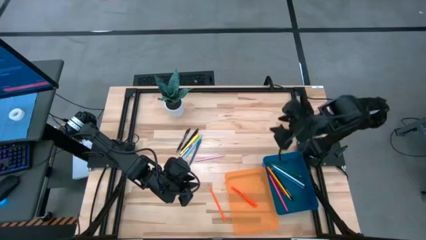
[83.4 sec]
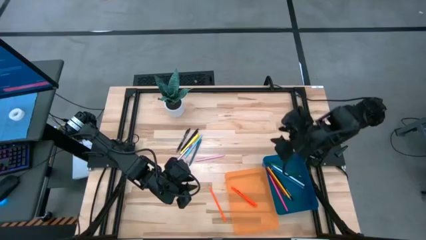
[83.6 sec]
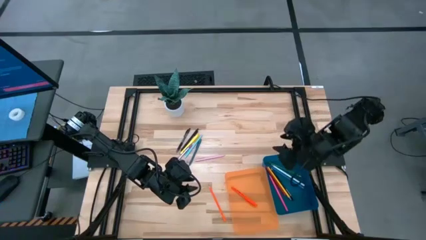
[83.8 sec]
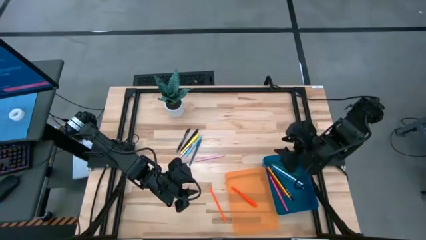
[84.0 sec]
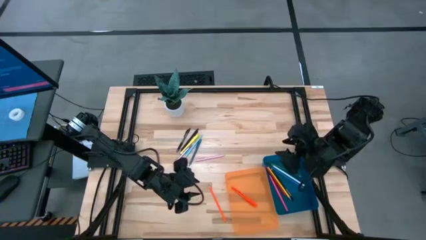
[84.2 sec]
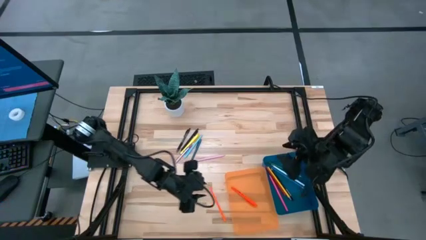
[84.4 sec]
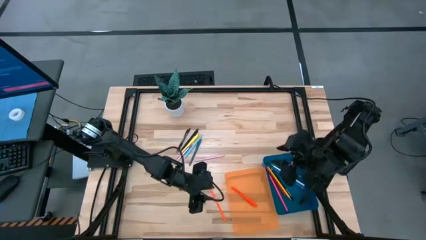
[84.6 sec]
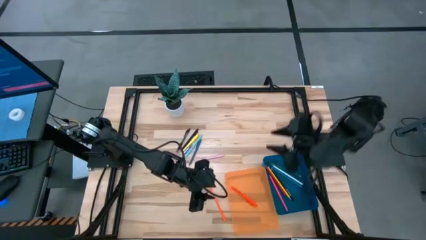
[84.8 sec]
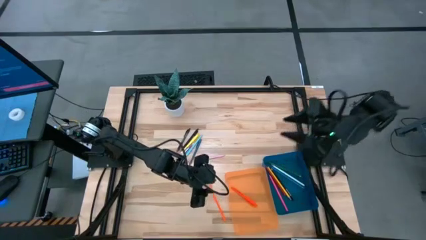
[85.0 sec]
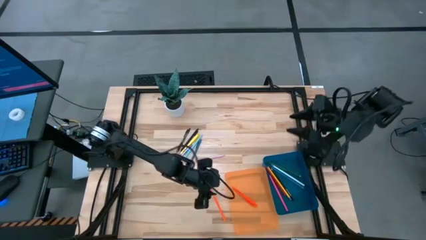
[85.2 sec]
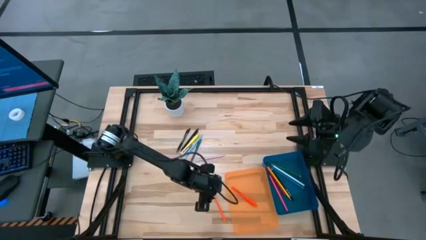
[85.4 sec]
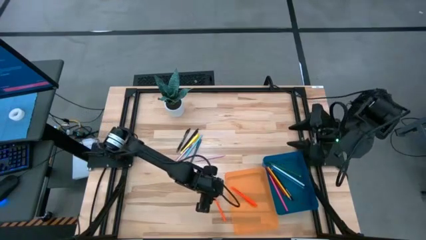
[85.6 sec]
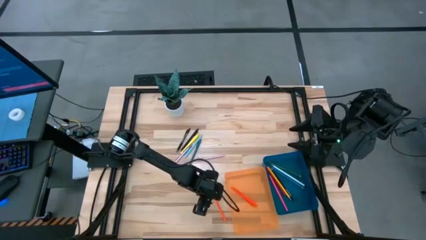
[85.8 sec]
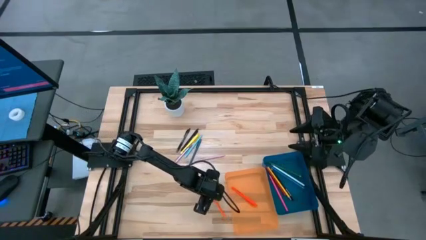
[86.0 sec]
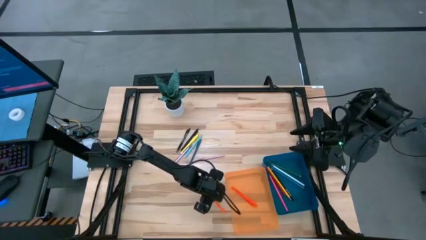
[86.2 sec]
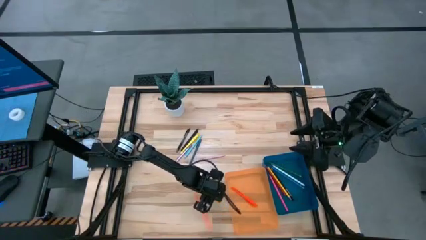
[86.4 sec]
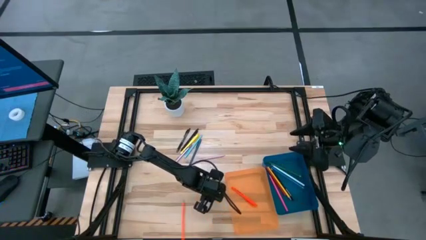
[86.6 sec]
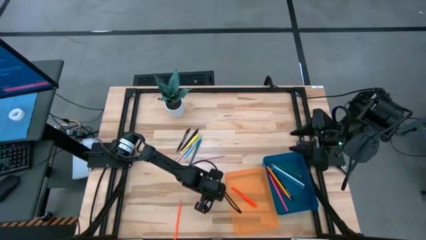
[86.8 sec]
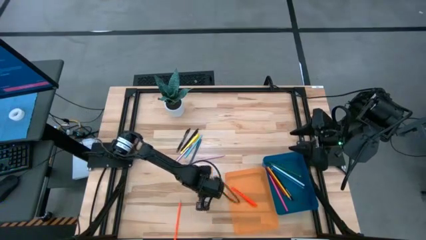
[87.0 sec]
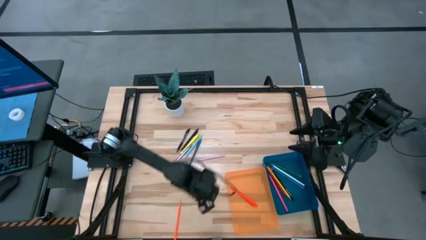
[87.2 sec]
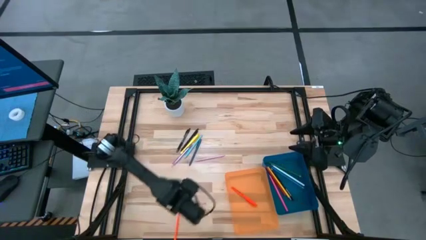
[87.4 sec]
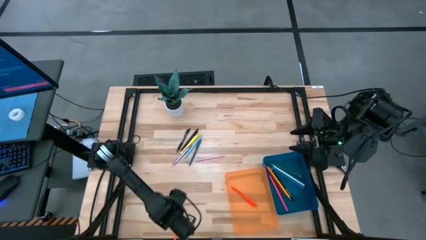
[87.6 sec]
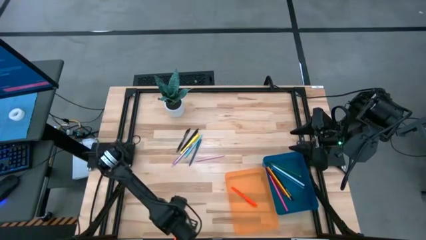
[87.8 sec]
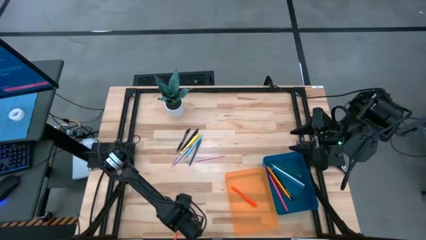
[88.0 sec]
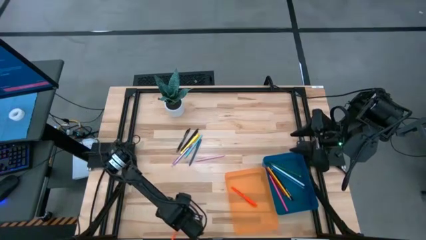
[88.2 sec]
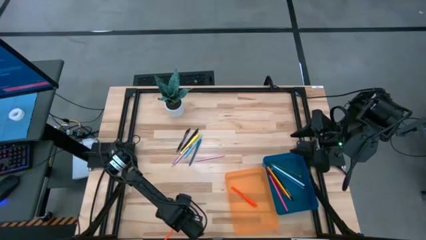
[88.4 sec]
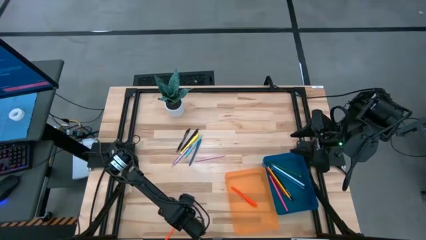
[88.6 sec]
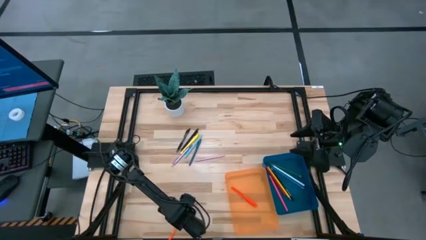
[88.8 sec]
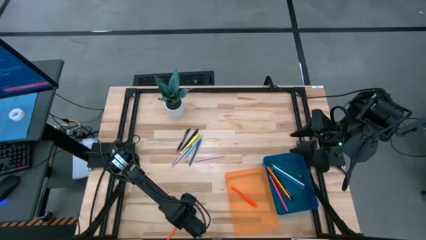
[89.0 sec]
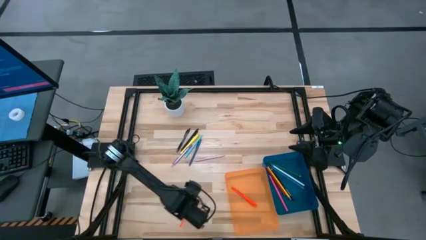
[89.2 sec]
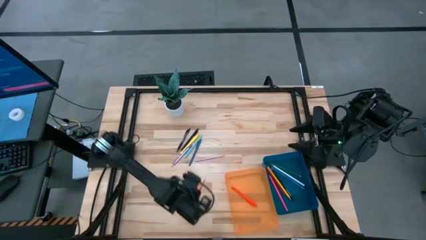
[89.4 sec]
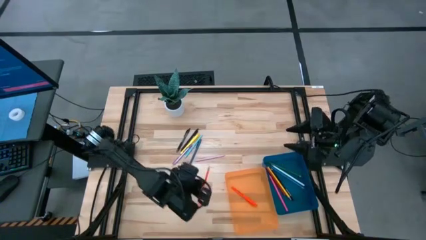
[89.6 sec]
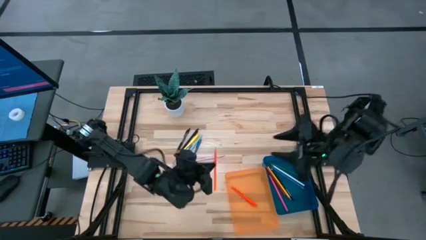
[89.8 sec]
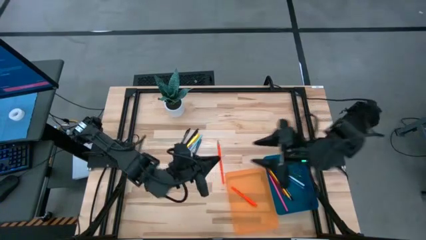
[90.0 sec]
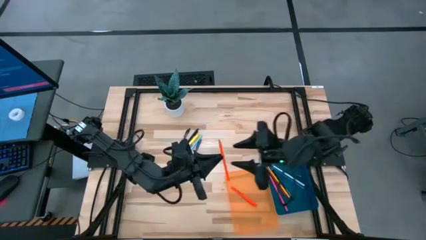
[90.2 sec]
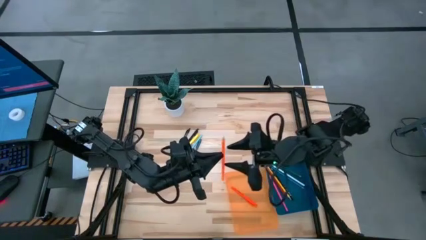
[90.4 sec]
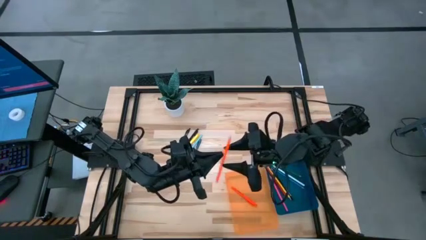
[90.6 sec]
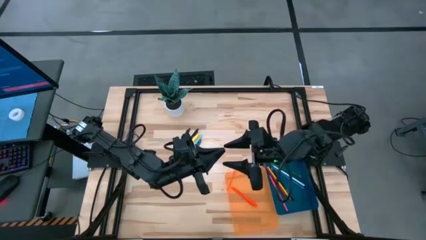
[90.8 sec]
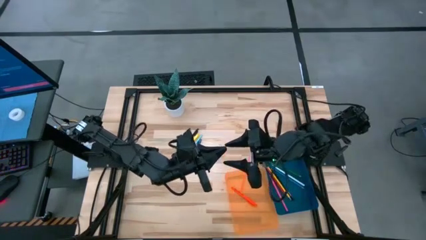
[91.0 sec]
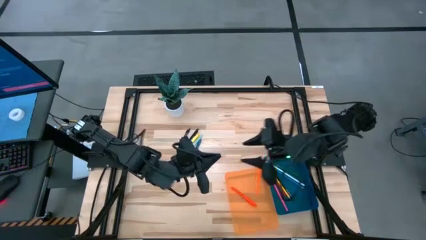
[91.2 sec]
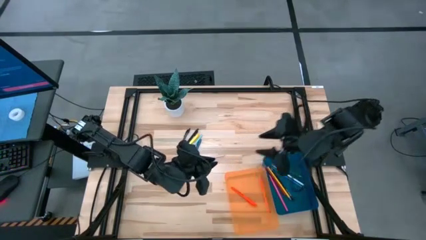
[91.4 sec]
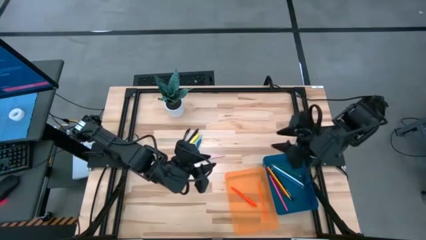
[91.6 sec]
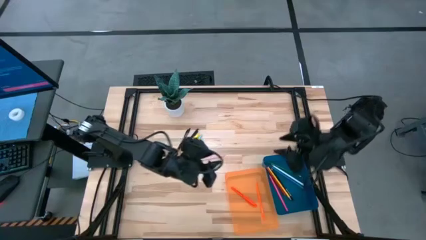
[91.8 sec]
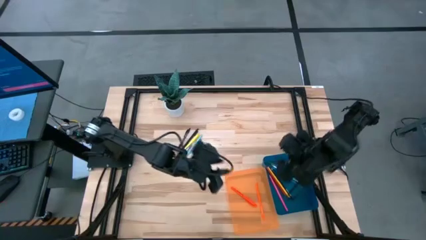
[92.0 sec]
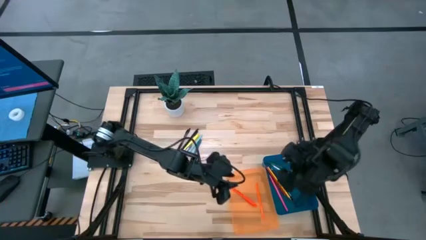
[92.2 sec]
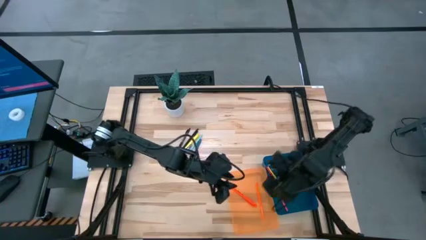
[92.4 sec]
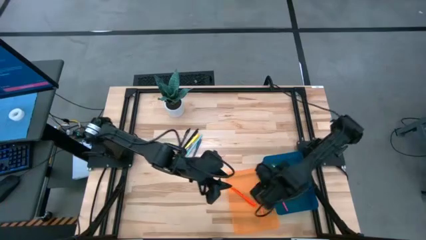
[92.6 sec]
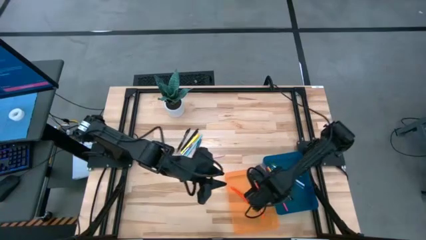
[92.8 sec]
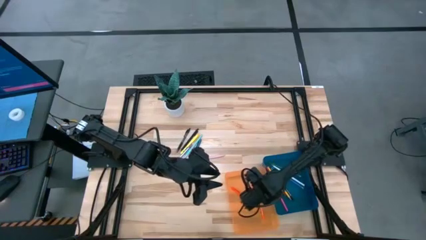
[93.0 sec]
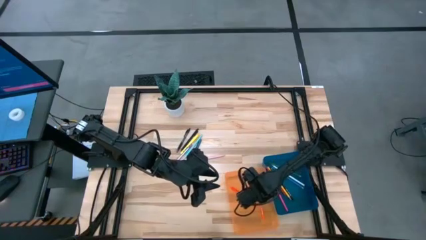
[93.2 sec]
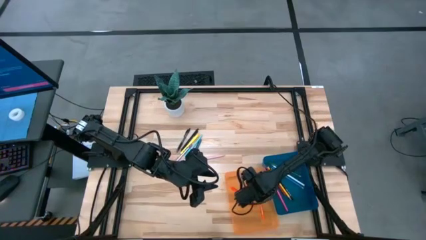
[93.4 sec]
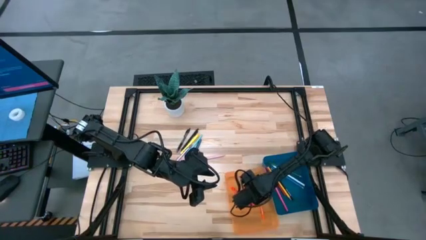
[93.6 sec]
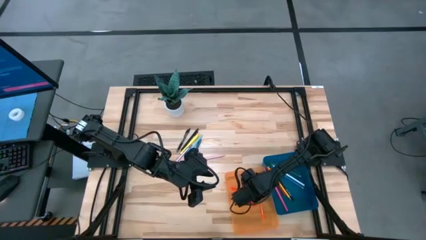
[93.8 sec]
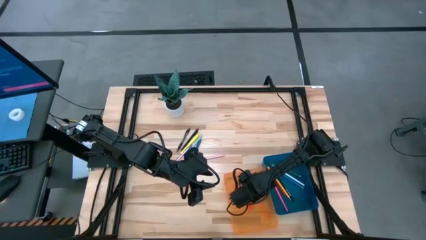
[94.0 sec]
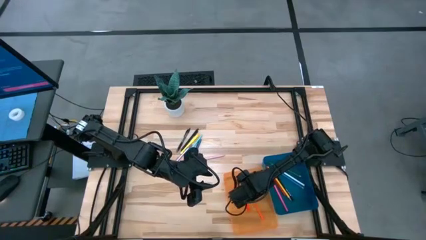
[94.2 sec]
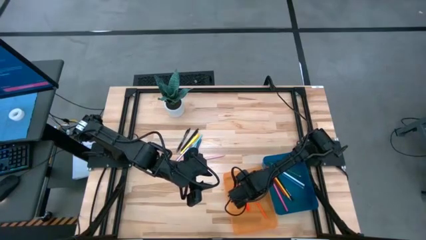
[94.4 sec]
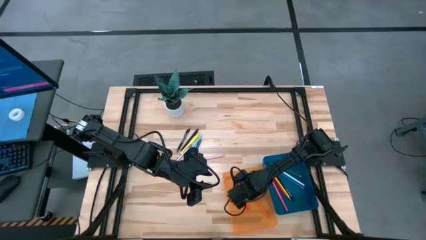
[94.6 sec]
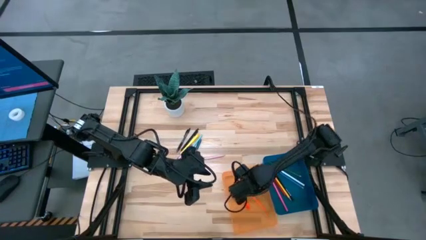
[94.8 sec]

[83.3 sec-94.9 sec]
Task: Sort pens & pencils
Put the orange pencil into the blue bin

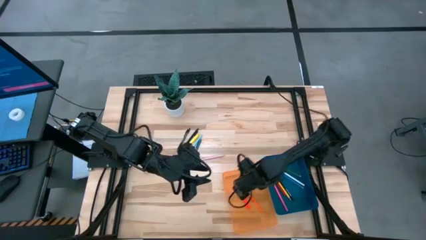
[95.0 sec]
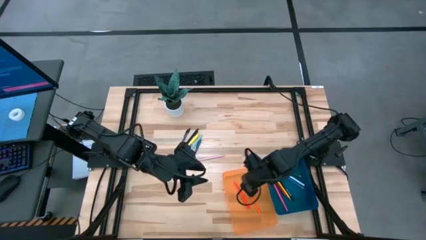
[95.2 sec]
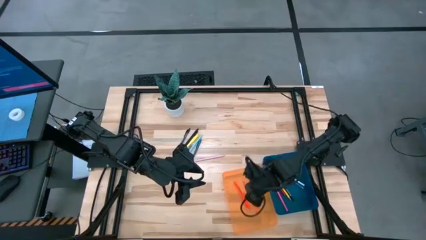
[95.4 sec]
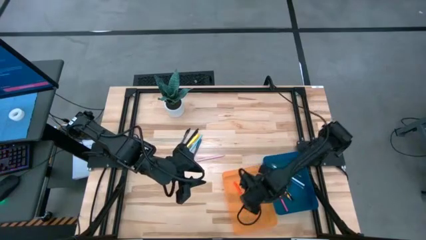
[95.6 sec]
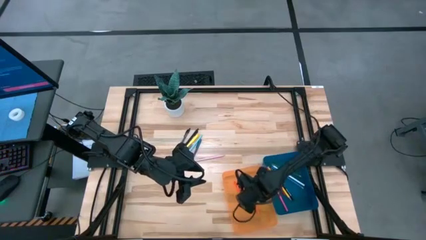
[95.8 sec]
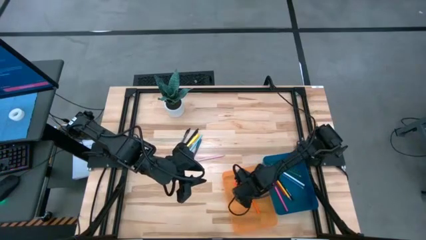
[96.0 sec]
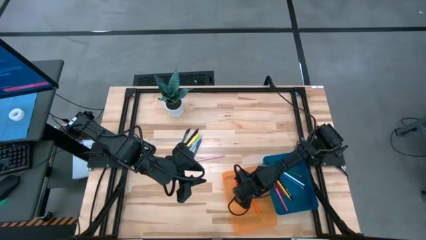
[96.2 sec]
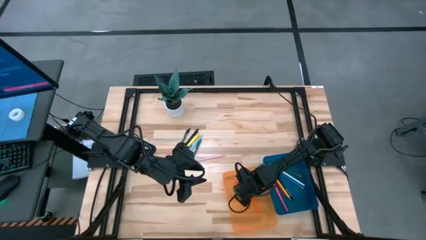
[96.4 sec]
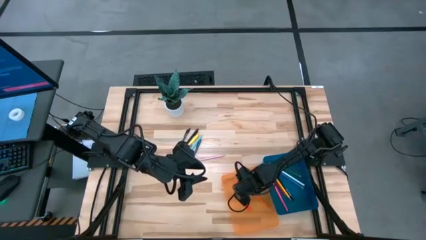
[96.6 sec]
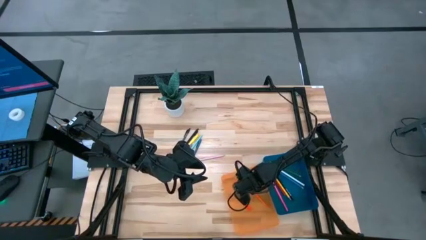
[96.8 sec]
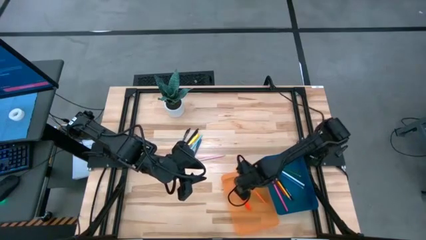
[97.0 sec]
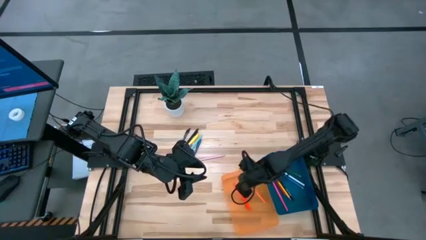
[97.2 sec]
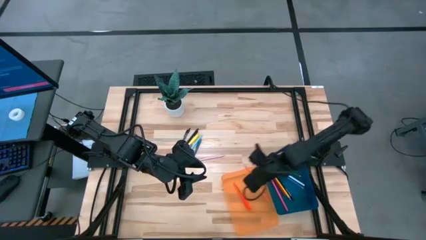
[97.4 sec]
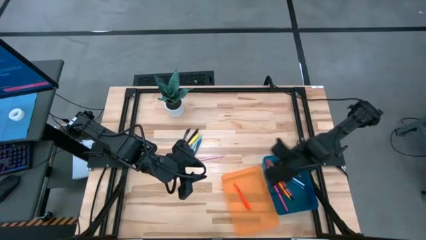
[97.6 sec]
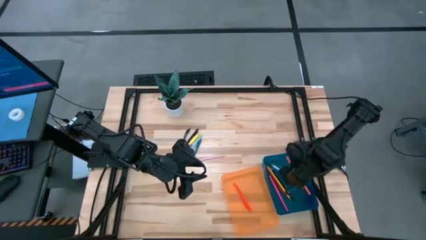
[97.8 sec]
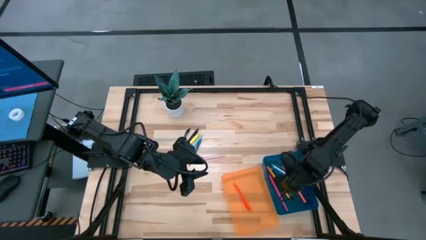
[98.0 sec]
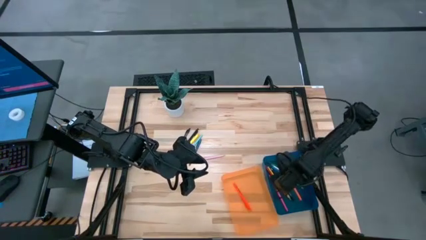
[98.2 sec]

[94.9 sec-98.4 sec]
Put the orange pencil into the blue bin

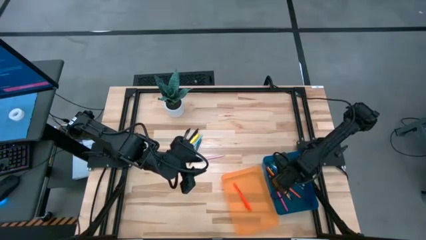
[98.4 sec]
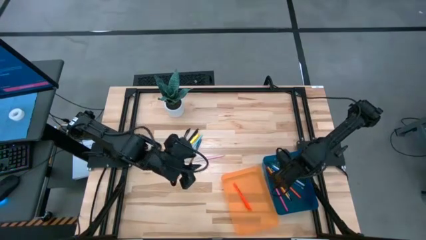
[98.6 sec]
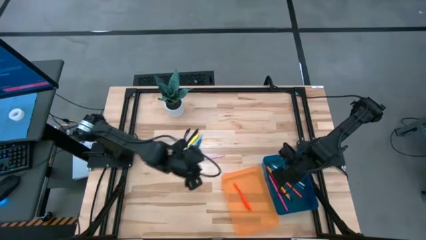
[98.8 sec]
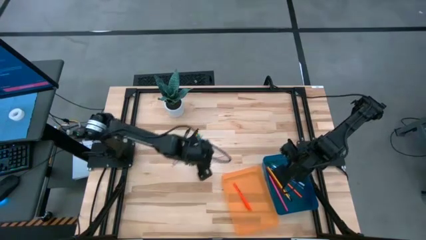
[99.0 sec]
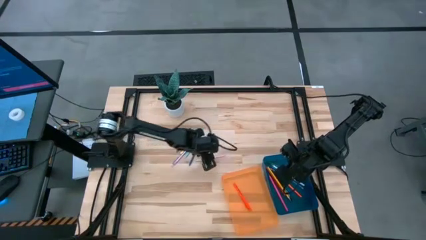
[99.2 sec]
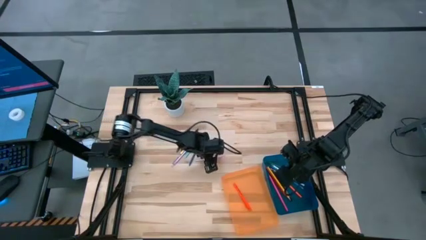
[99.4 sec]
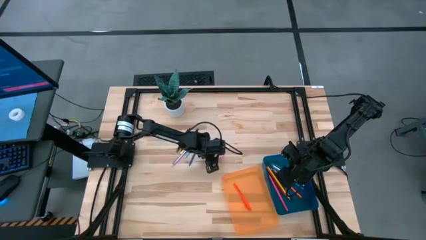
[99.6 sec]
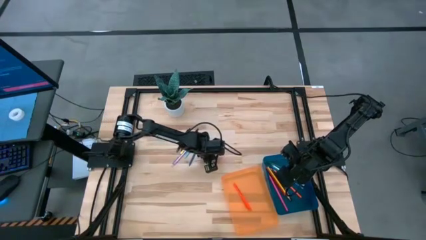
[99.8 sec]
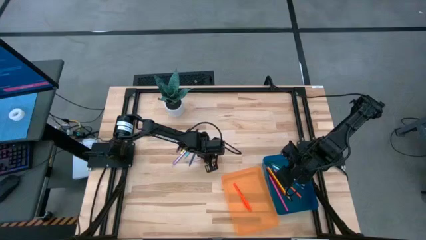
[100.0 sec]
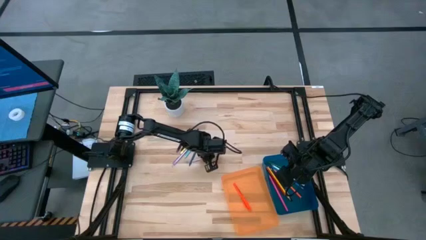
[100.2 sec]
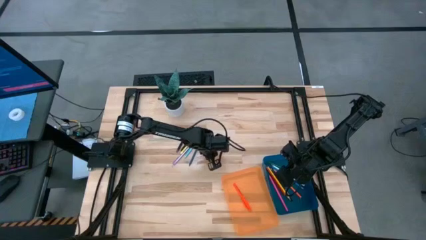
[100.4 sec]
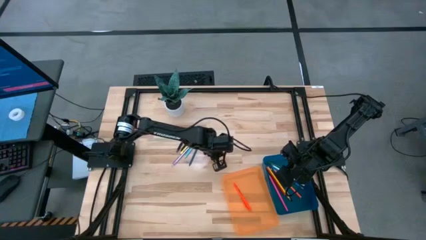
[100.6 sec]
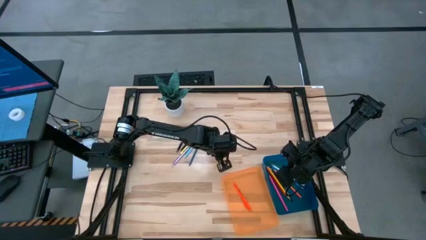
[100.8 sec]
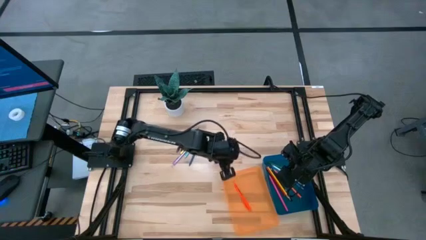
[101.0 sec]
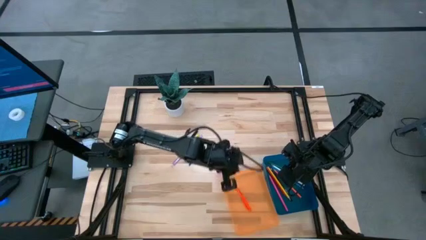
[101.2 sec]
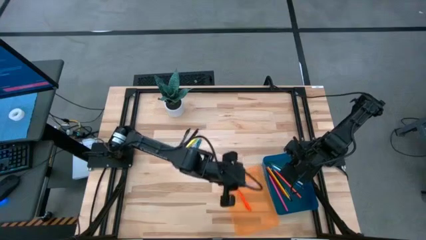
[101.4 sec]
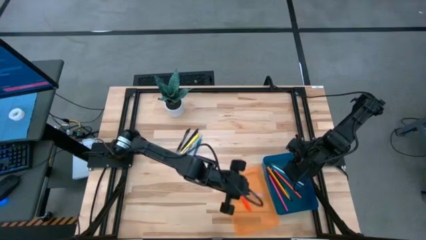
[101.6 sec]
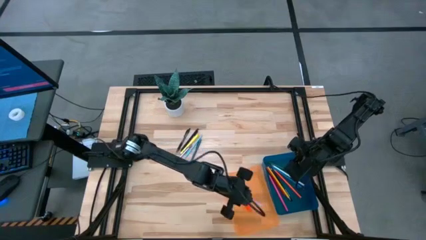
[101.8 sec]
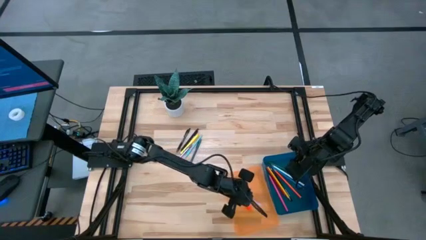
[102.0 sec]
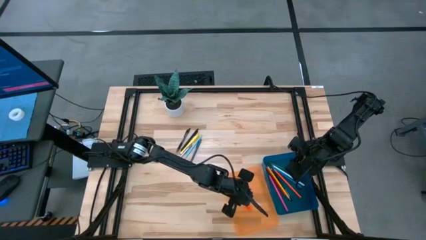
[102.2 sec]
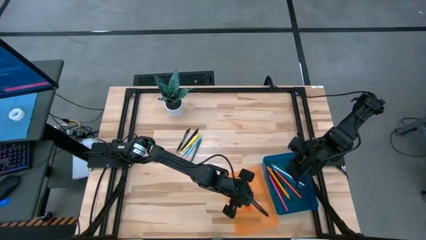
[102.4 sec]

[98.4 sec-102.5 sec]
Put the pink pen into the orange bin
